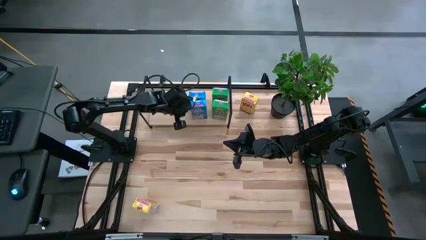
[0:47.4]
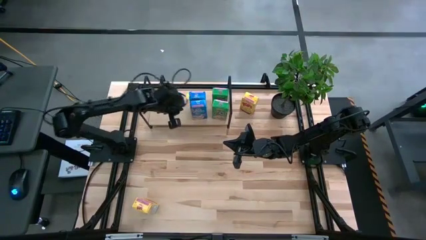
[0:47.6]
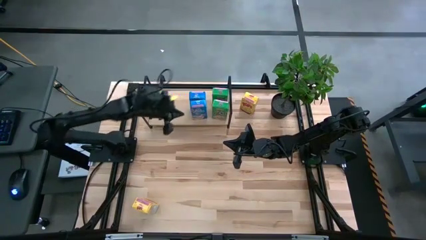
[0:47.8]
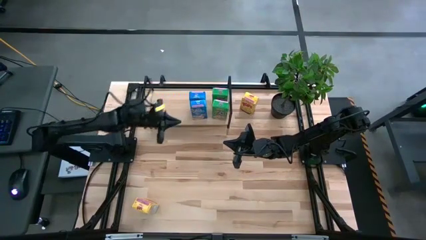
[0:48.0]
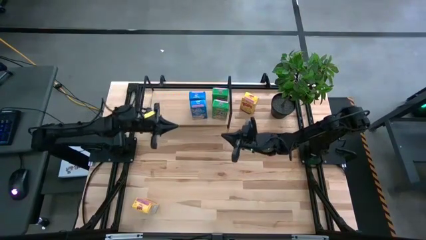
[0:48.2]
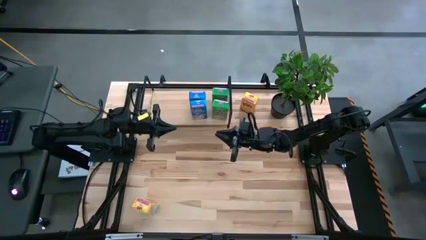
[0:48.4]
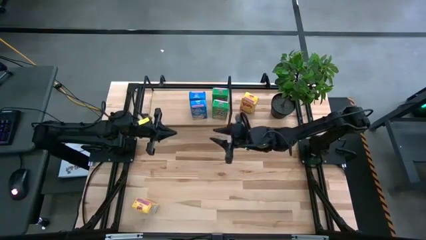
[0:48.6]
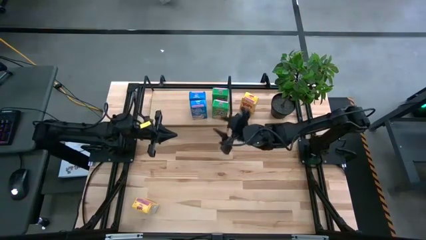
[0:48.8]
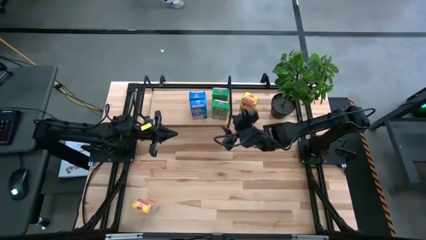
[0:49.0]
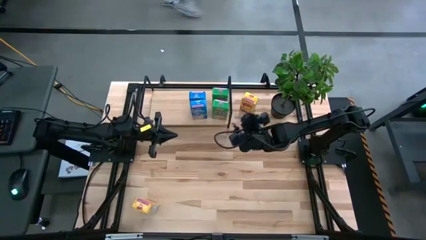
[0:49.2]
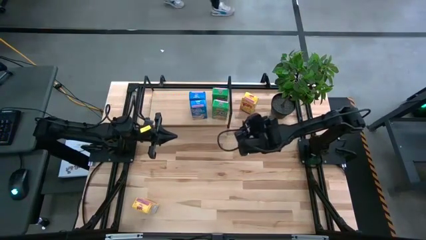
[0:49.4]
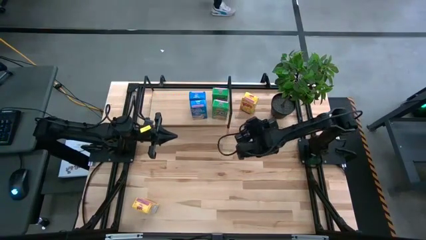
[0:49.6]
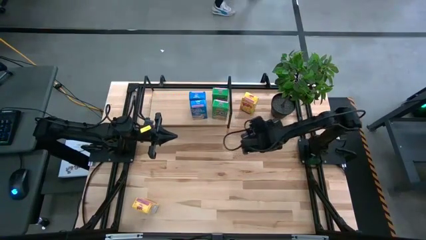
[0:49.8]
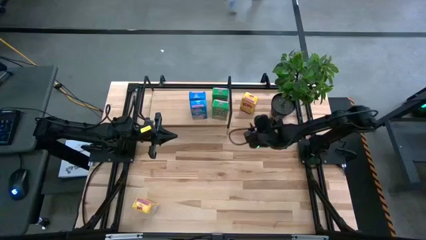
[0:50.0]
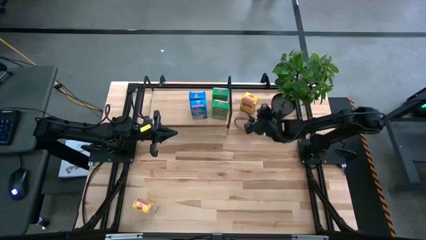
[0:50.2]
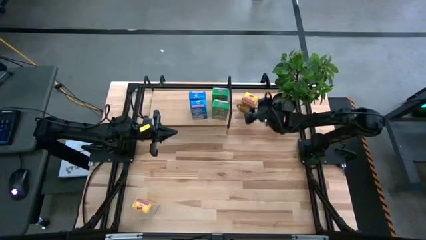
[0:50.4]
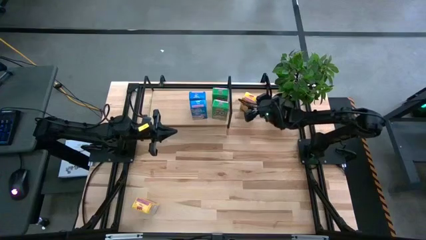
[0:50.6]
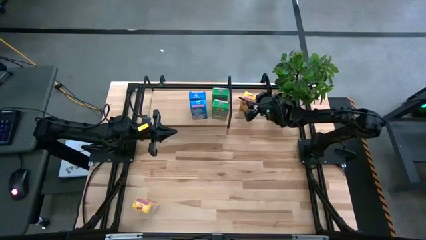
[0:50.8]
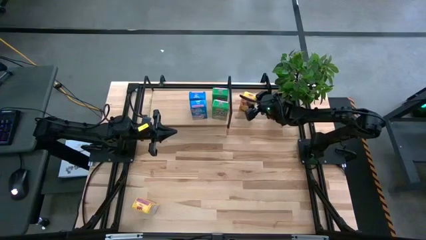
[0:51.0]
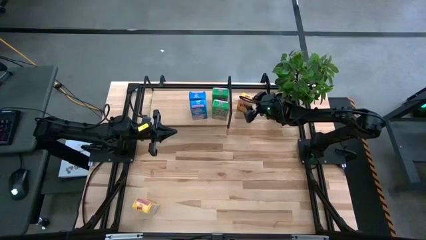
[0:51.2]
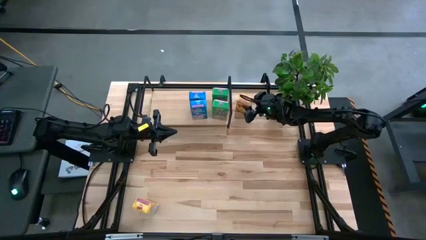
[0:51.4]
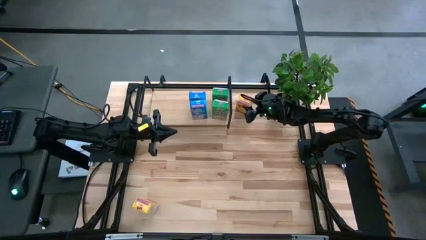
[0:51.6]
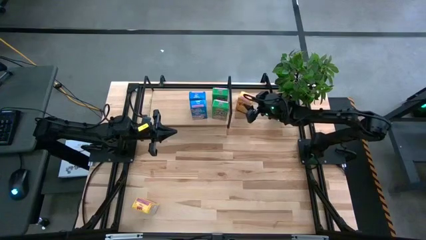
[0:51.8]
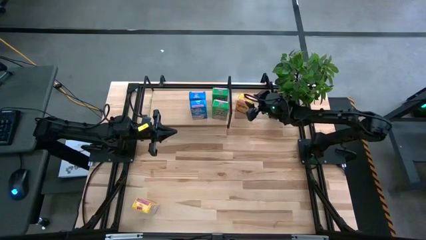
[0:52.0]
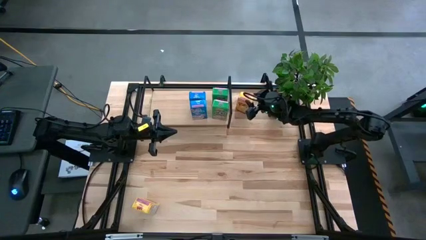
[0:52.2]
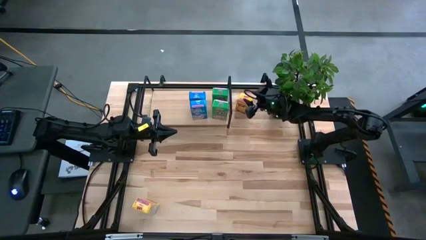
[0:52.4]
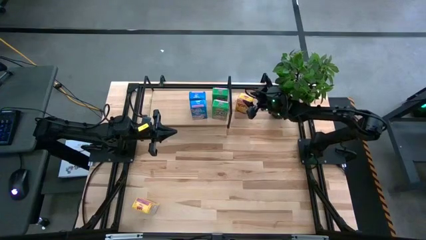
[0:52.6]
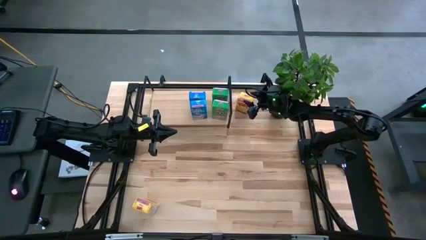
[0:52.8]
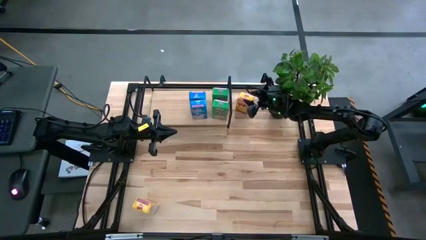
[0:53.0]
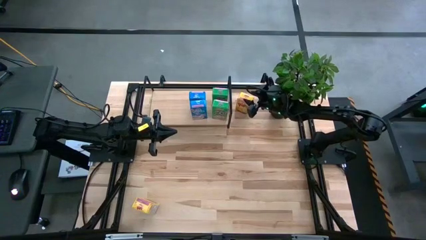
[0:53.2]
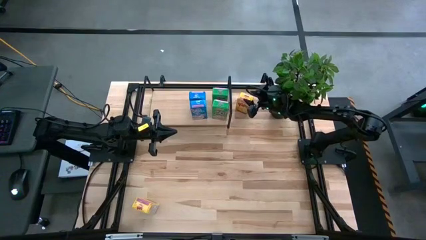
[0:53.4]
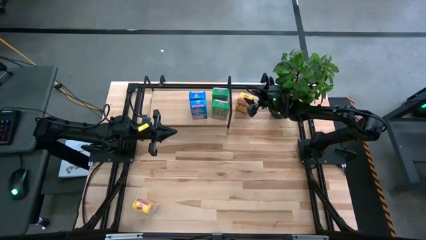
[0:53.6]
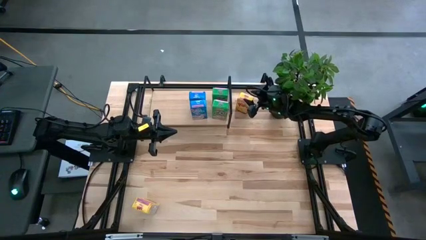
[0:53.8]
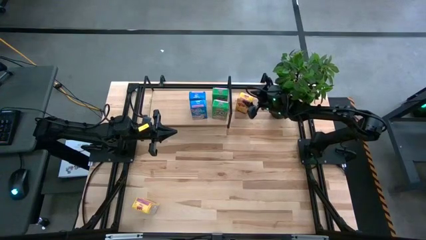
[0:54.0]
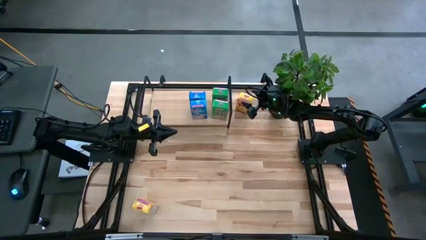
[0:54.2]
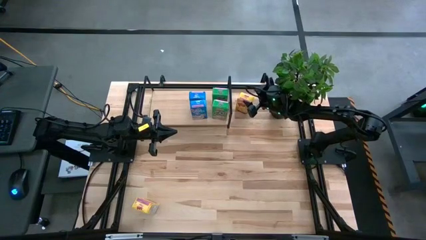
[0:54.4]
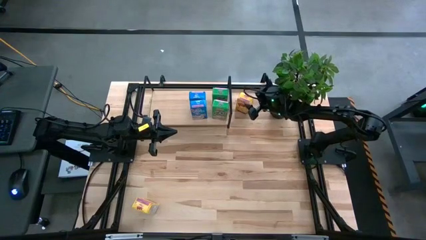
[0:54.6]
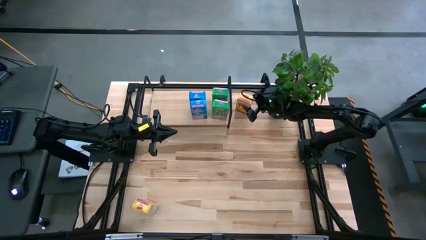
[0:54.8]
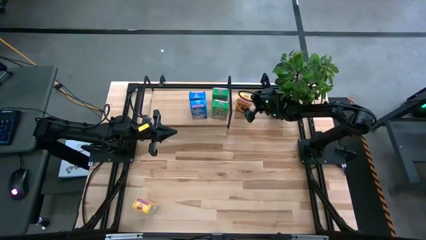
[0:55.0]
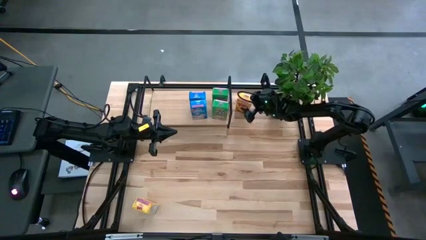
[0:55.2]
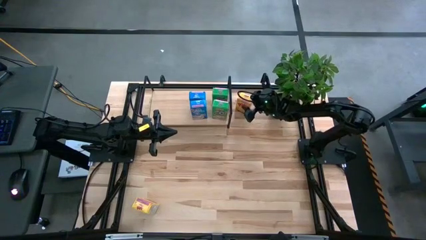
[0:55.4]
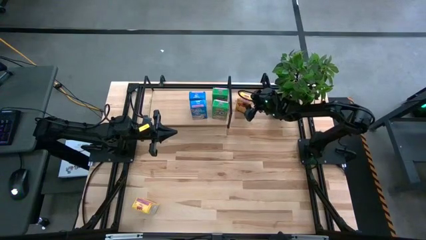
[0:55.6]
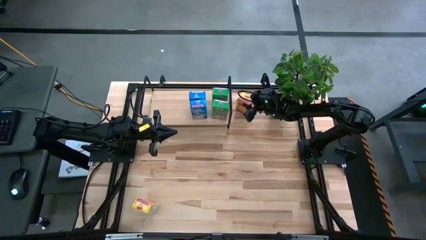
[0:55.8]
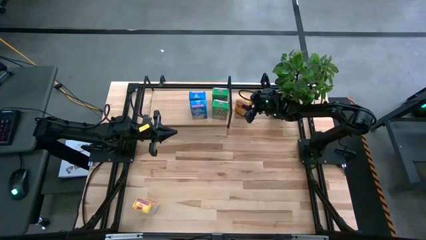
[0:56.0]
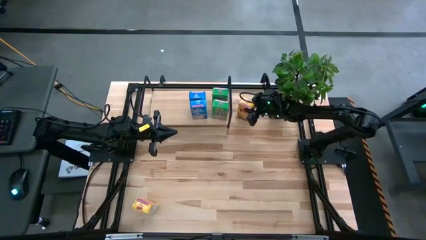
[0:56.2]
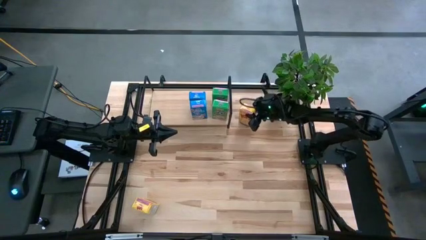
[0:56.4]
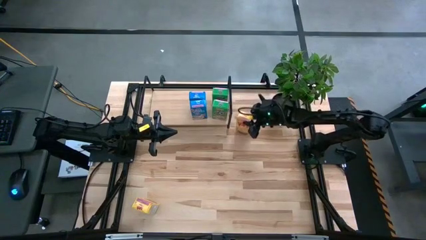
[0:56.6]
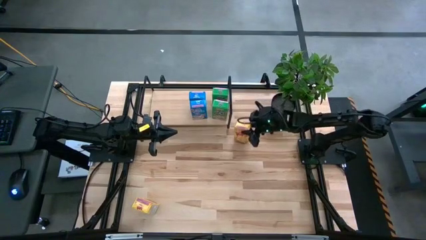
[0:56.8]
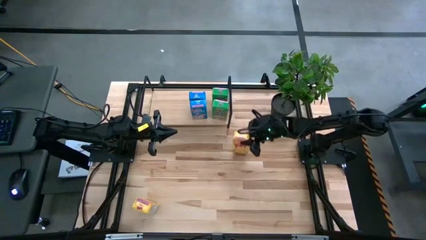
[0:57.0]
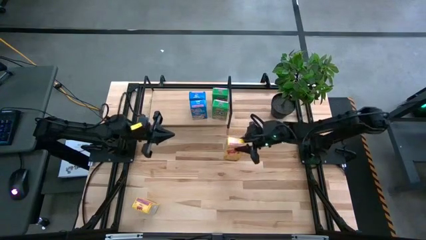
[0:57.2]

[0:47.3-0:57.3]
Task: Stack cereal on shelf
Put the top yellow cereal box on the shelf

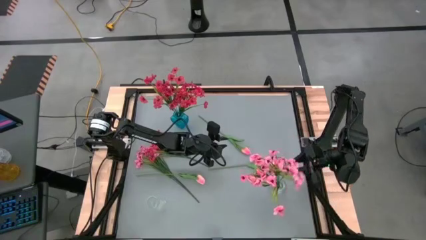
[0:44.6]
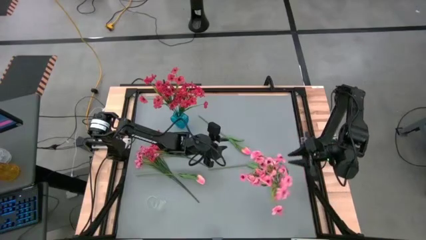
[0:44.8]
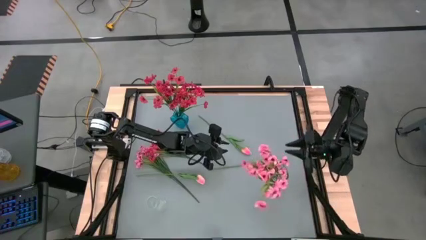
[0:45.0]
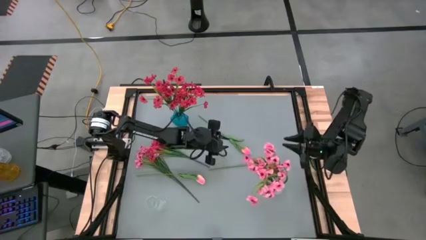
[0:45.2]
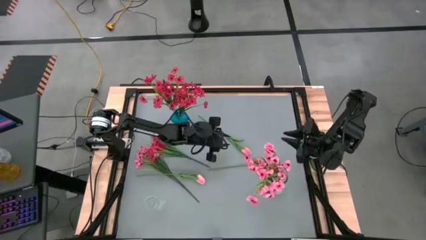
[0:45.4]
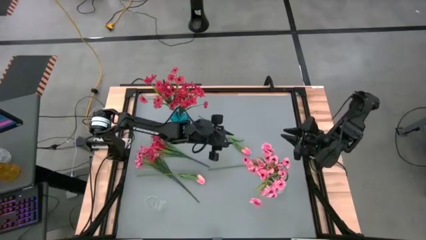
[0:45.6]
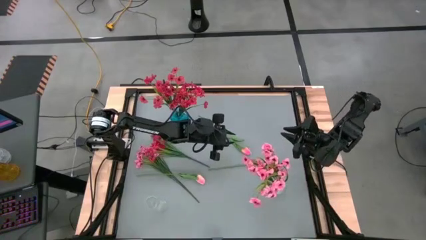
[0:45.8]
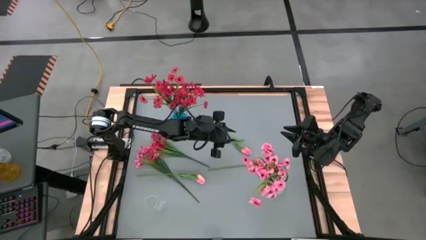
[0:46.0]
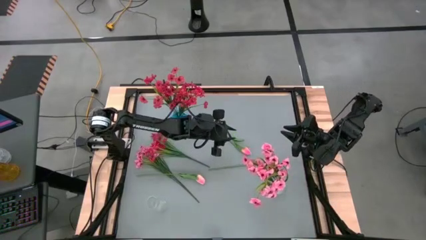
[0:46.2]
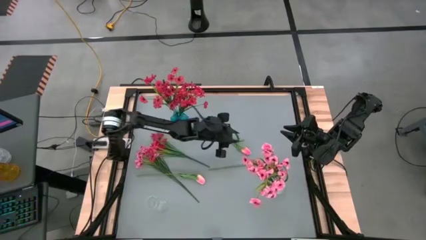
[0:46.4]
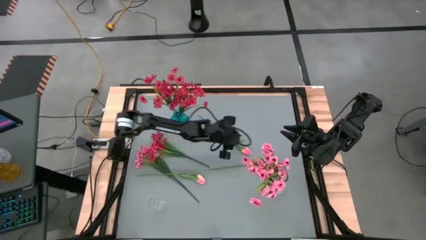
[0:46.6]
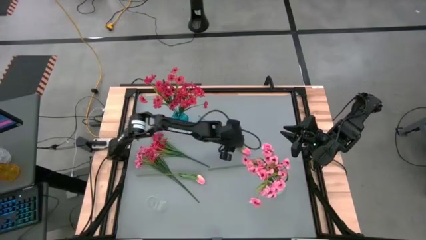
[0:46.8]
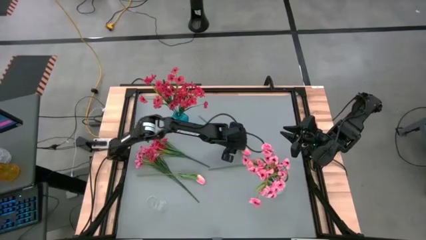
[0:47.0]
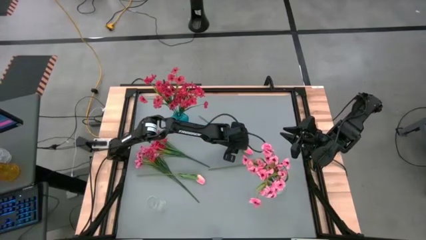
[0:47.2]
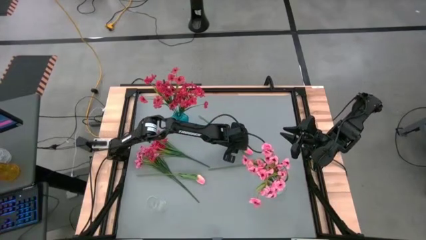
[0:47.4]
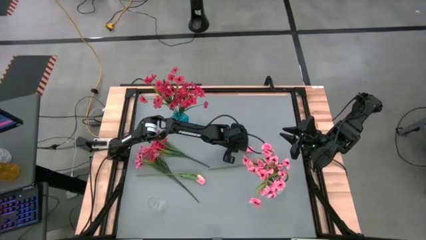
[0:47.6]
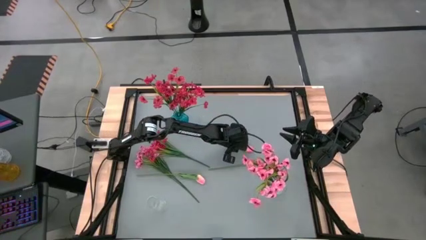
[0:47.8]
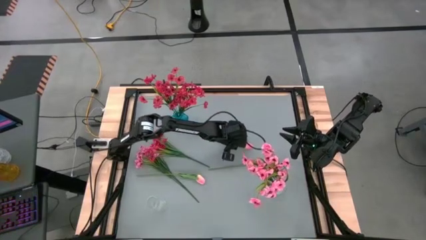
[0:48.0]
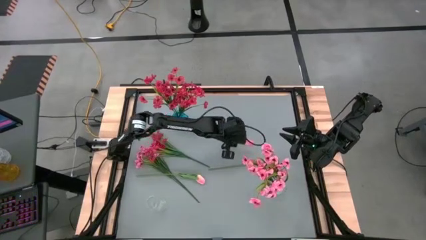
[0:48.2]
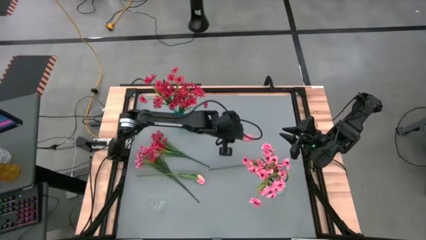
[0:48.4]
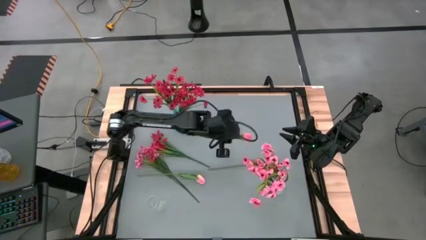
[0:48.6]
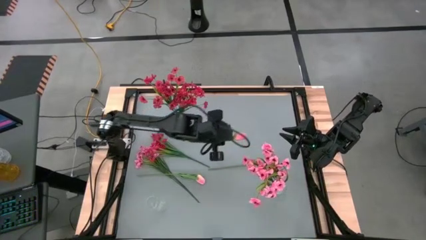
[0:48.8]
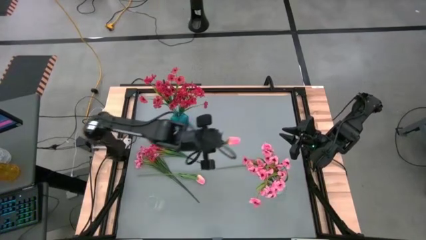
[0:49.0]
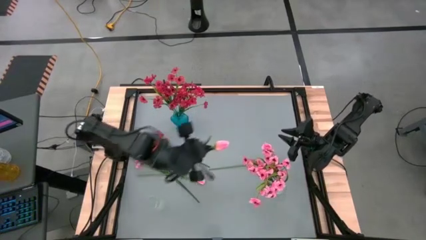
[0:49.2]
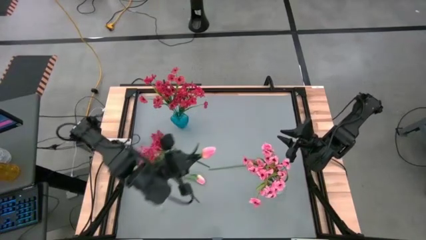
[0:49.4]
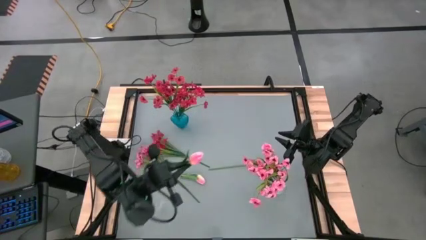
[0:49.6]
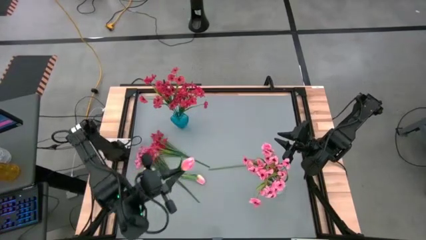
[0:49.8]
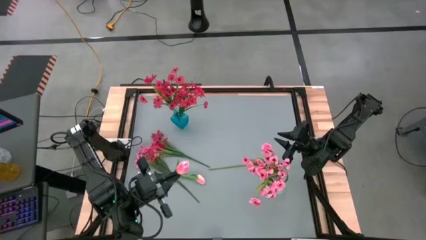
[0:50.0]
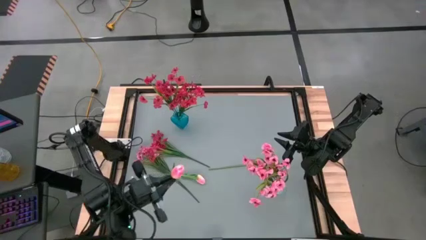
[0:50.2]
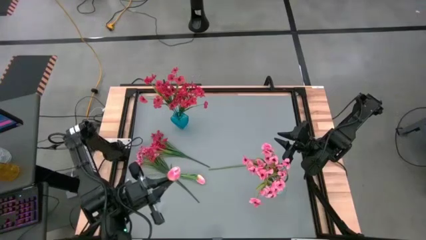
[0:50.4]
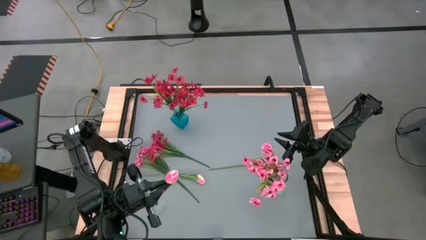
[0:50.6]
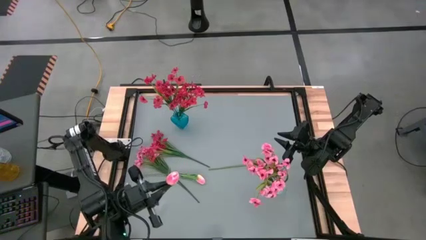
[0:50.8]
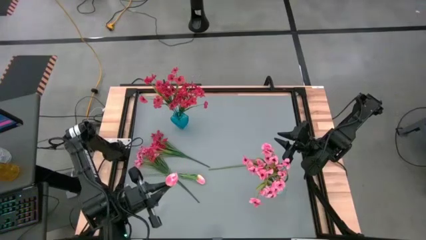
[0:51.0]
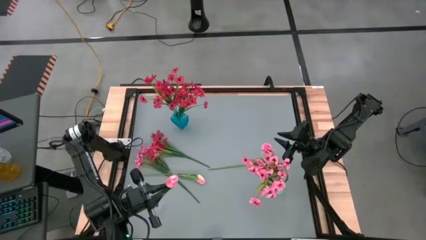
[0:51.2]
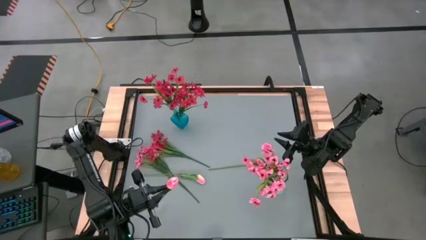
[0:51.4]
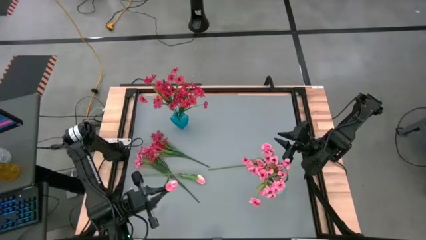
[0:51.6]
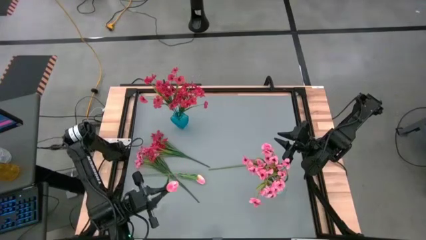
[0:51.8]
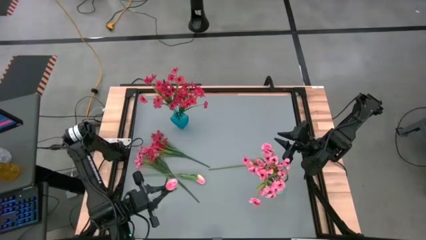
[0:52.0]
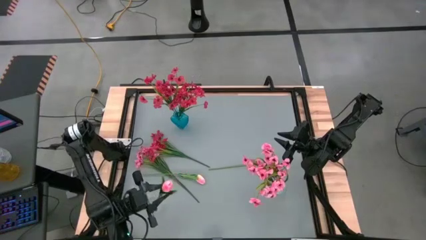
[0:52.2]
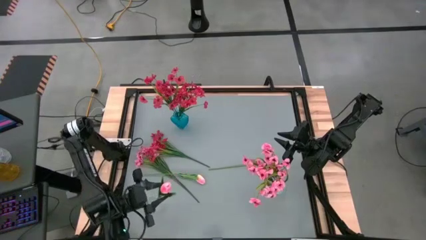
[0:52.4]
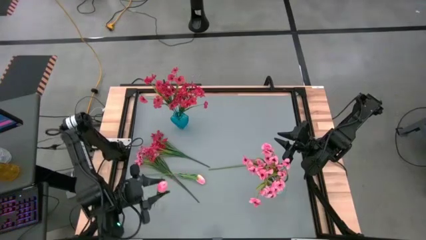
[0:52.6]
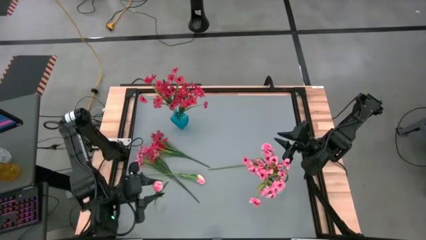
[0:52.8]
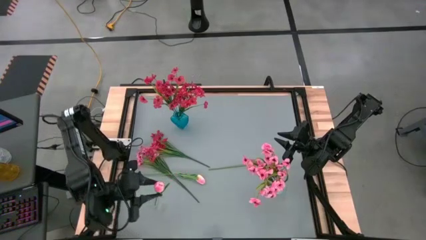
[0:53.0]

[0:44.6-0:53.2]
Task: Sort flowers into vase by color
Put the top pink tulip into the left transparent vase
